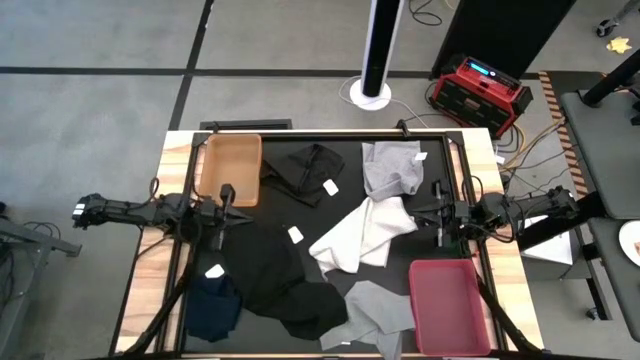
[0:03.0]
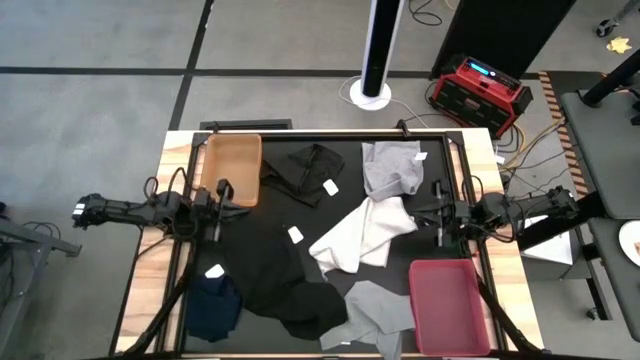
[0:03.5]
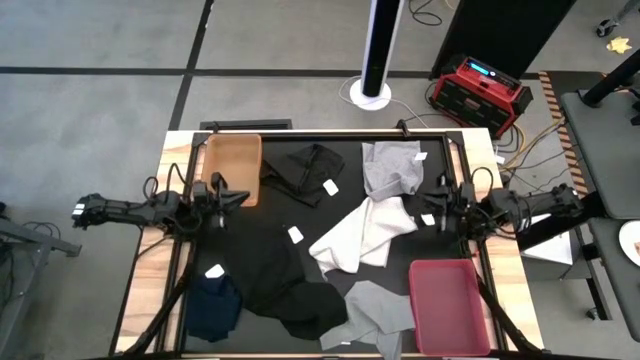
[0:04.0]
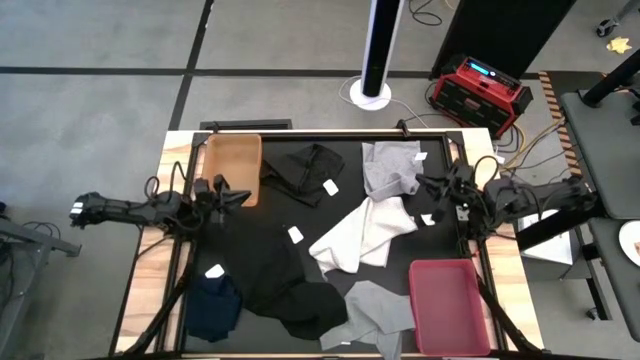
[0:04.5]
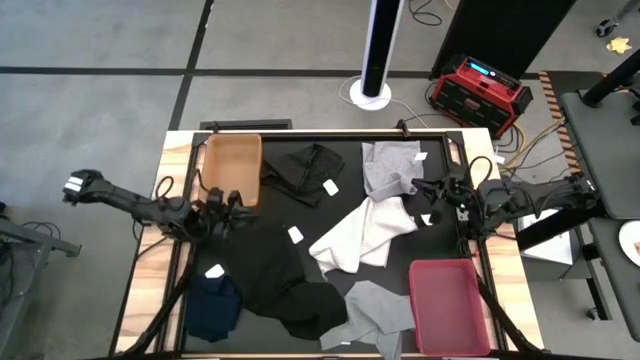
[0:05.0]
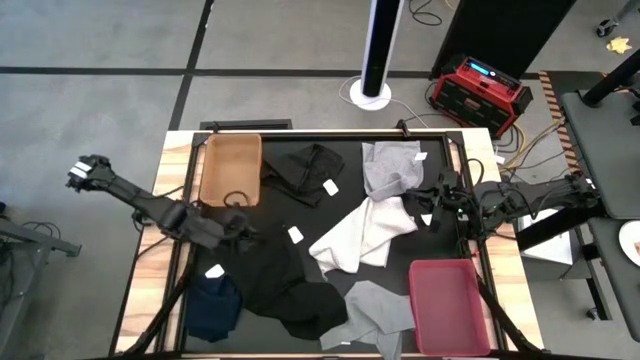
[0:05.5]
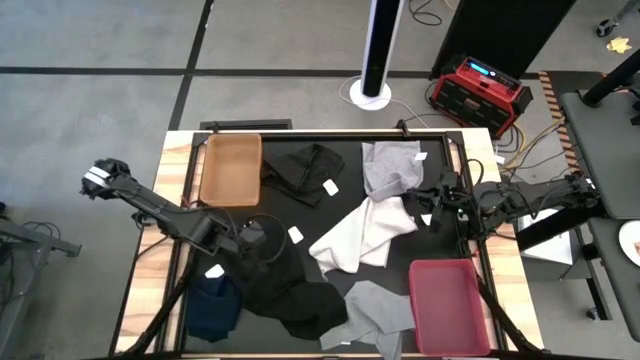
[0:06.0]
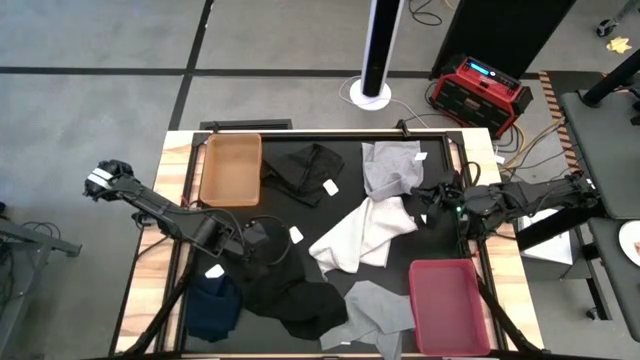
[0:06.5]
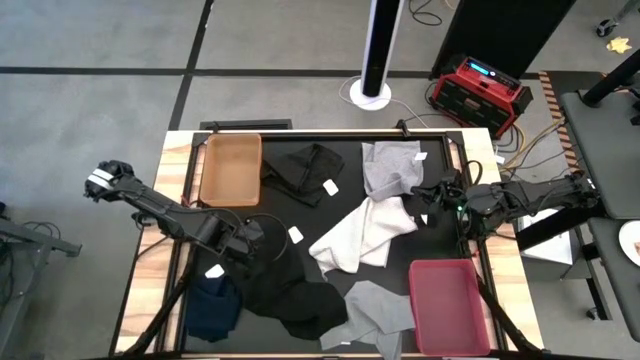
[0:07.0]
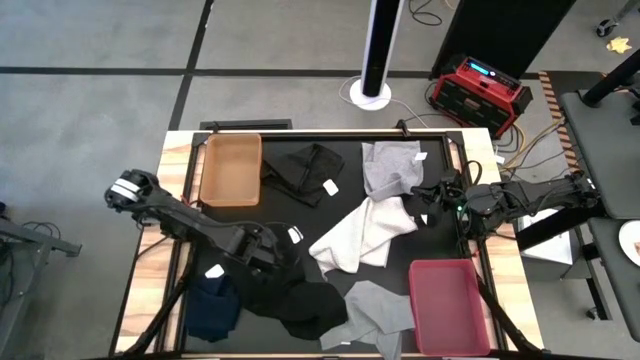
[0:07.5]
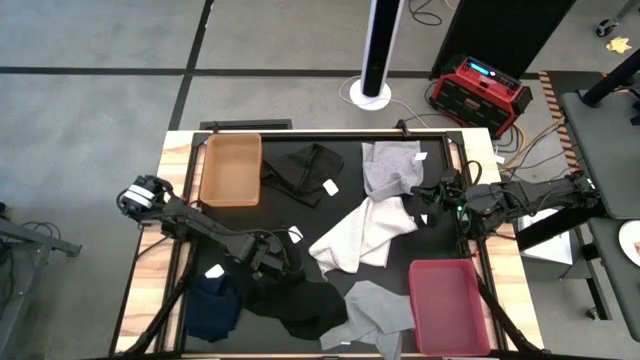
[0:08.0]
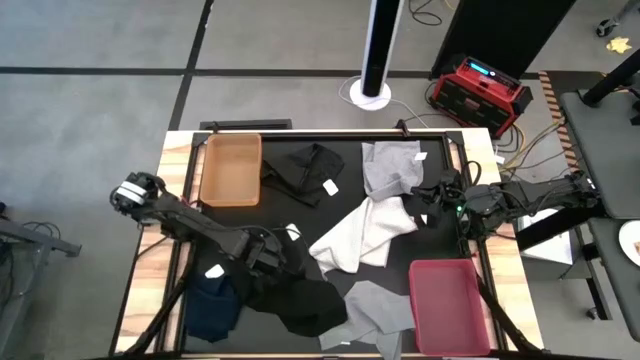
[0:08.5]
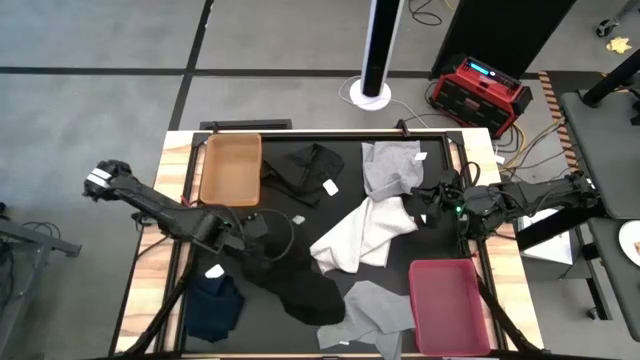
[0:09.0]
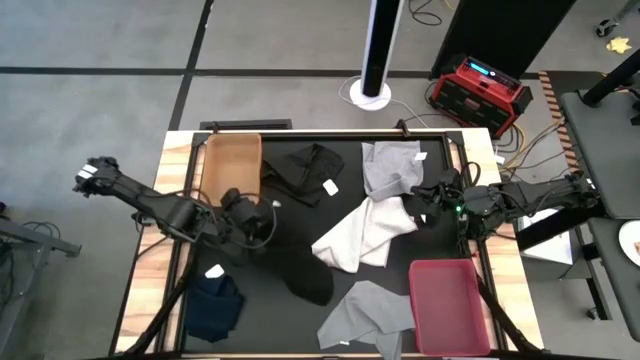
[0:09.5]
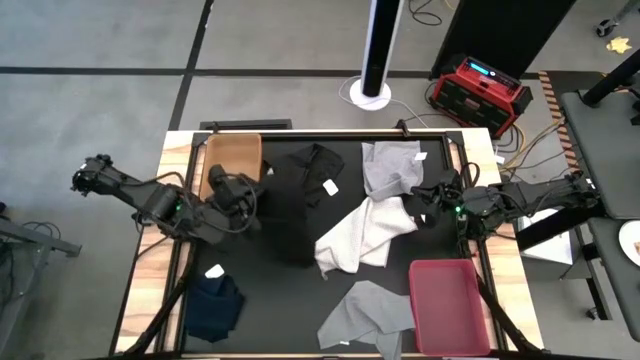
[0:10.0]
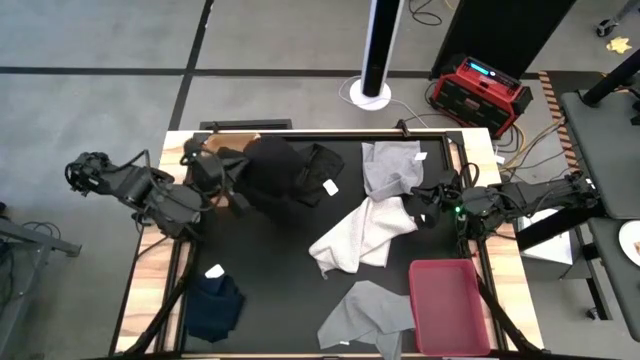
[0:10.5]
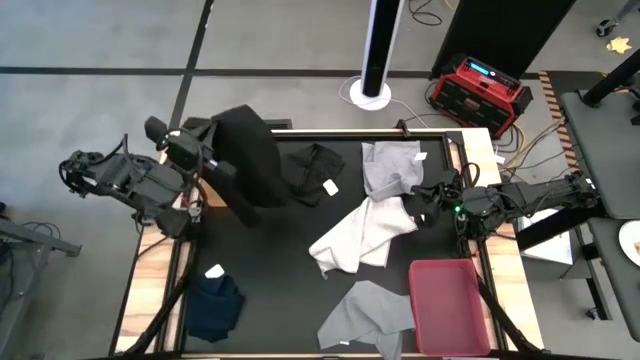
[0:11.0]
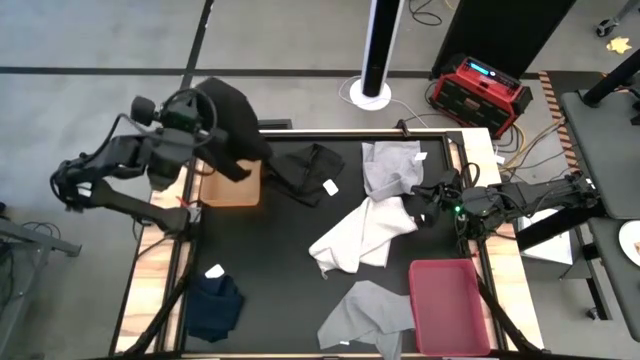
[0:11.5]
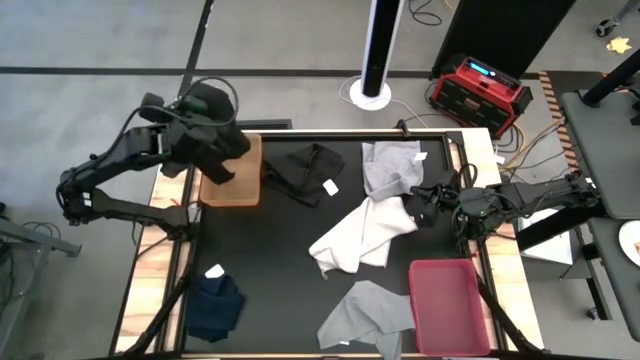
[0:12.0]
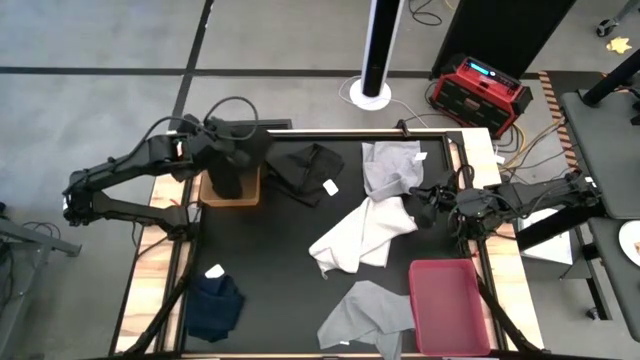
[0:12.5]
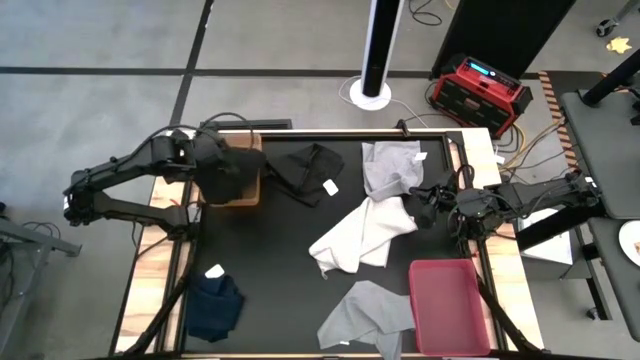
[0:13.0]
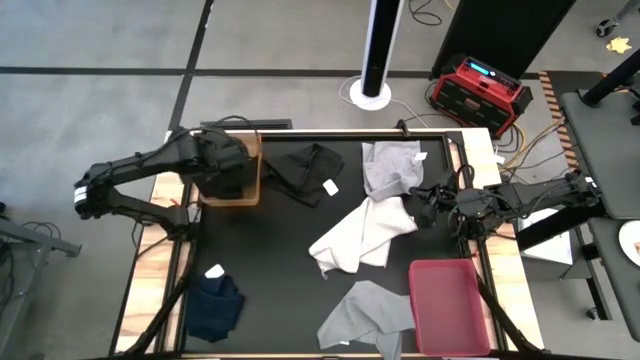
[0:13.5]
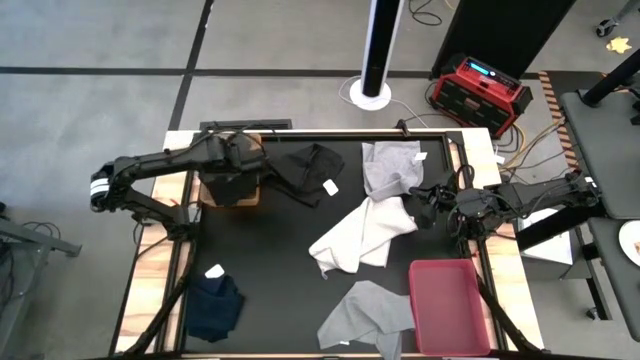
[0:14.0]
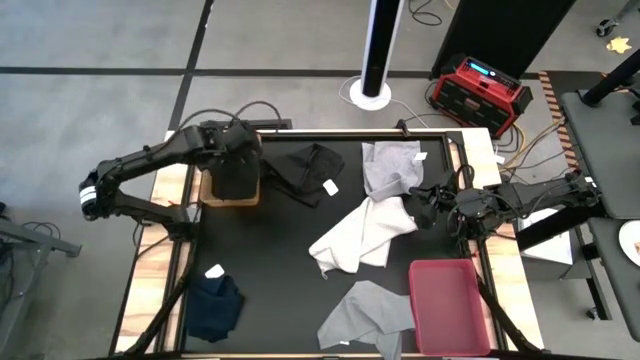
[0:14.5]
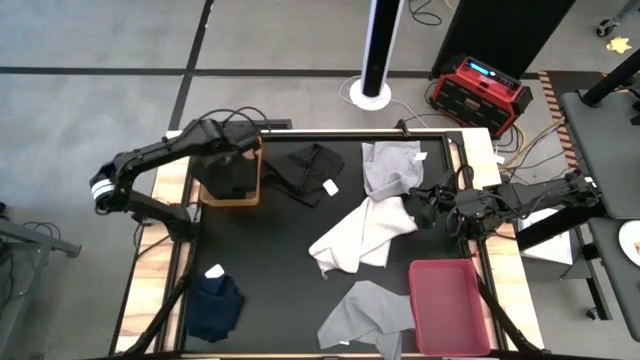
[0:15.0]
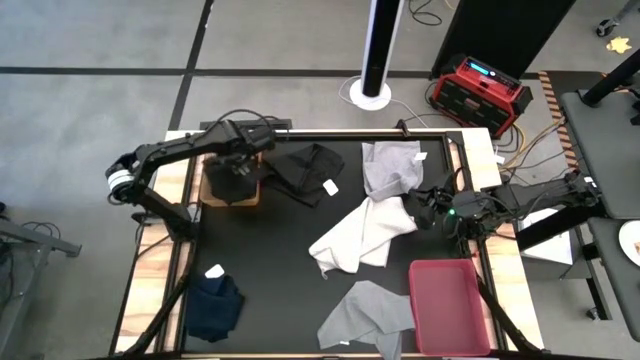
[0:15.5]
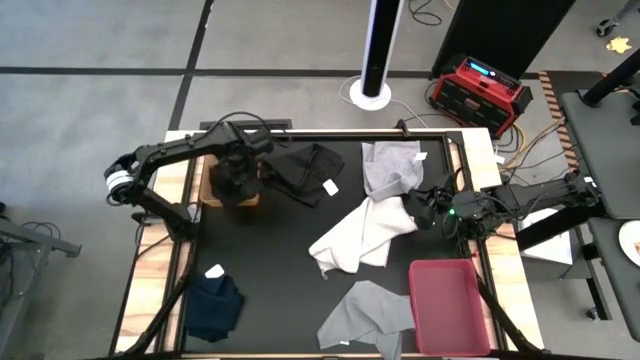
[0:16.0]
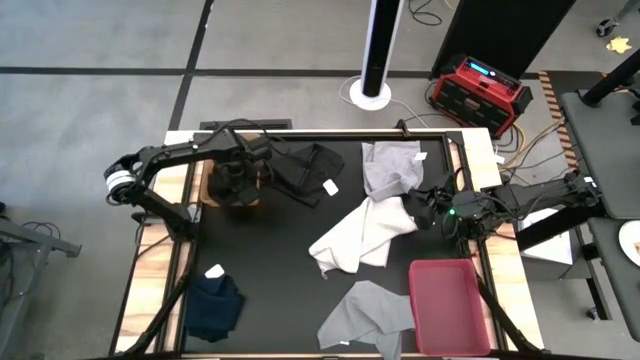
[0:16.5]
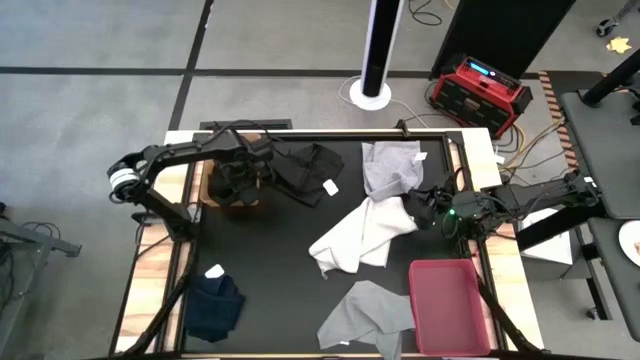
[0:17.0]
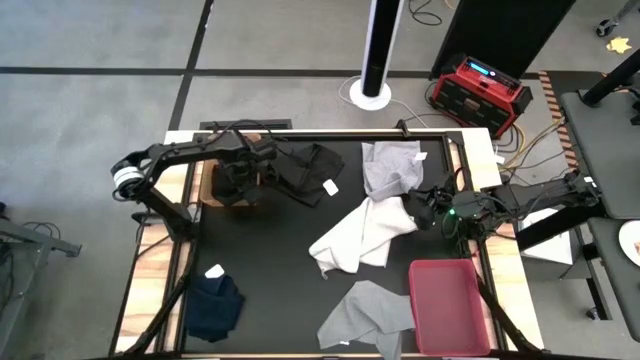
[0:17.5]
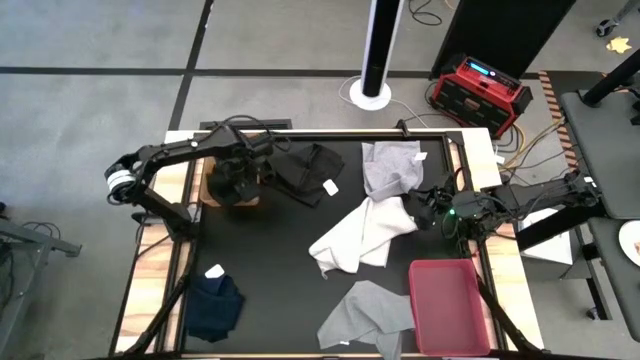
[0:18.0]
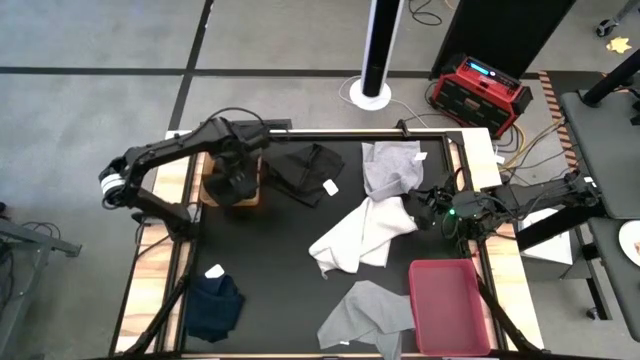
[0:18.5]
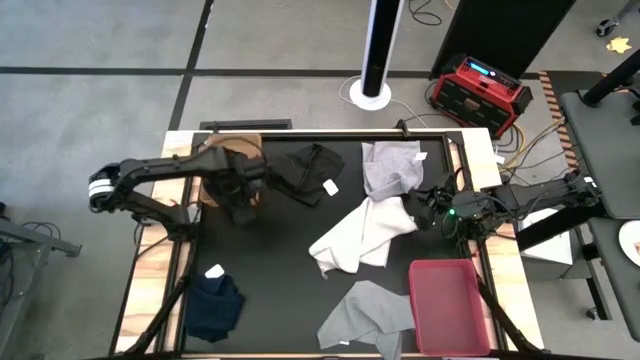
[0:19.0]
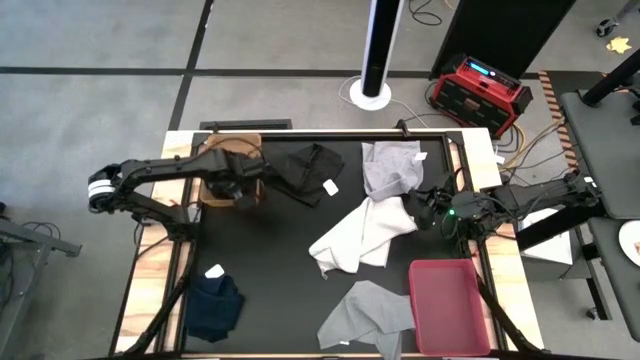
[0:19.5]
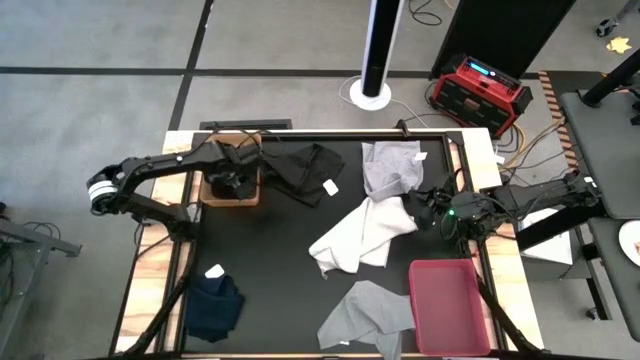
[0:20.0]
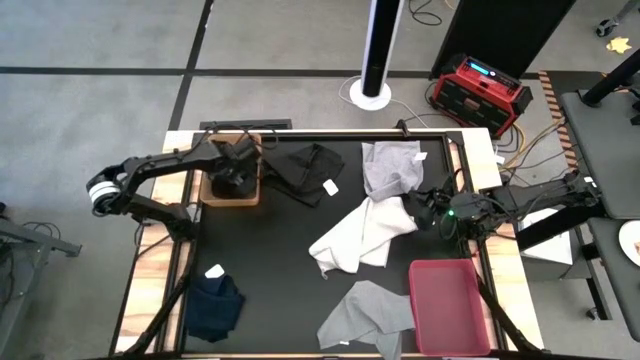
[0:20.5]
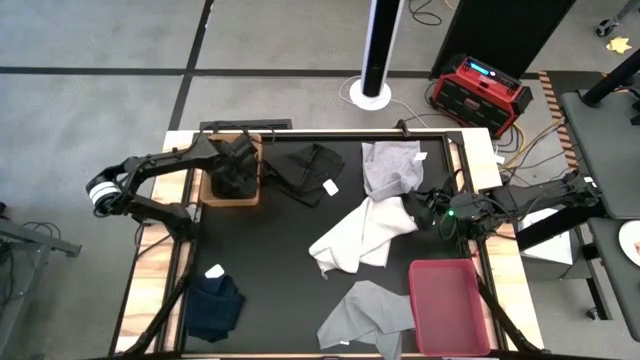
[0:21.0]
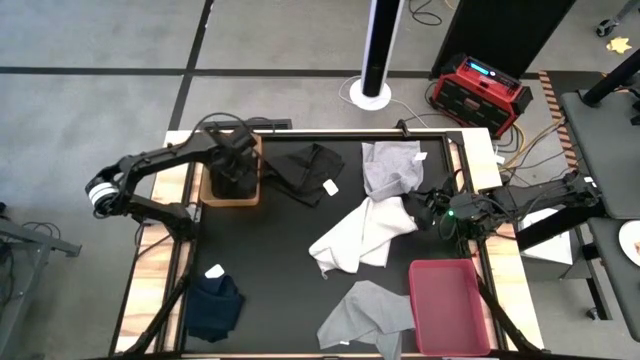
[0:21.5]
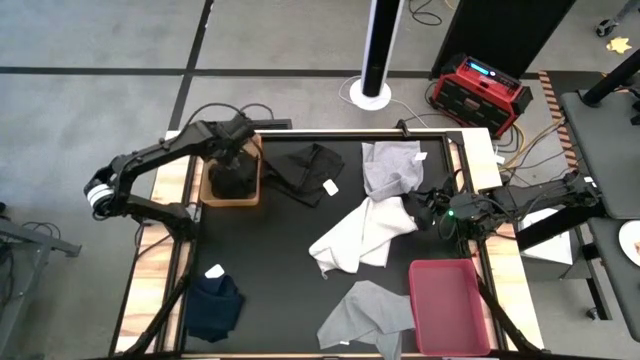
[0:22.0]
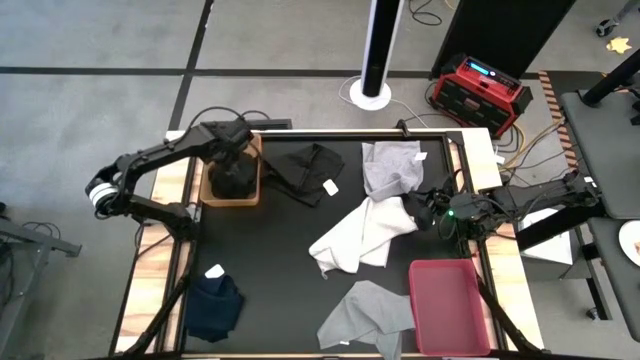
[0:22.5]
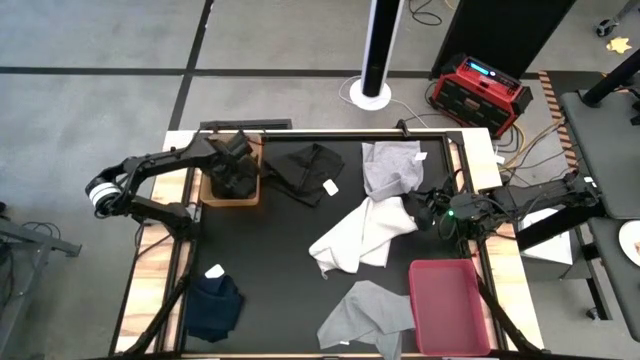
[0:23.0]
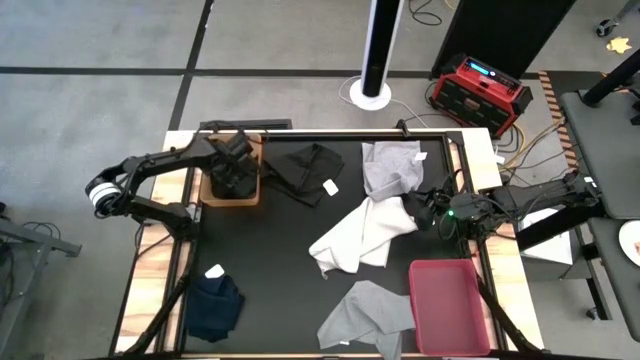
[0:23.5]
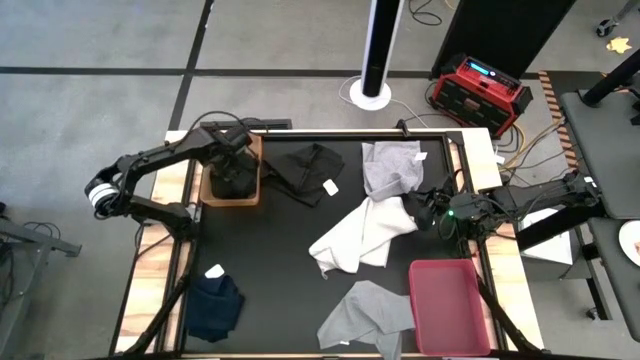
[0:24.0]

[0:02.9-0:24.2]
Task: Sort towels by color in basket
Put the bottom black towel into the orange bin
